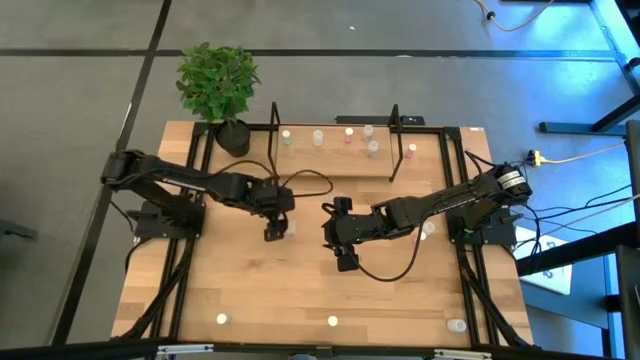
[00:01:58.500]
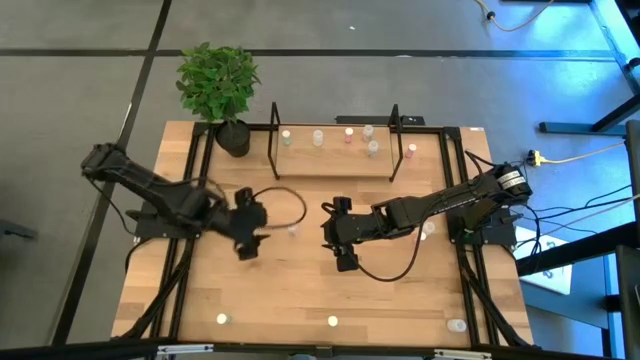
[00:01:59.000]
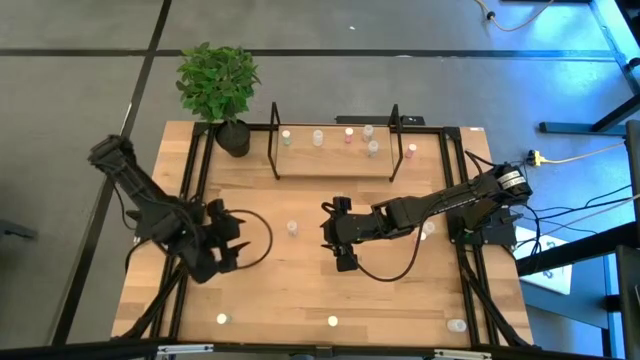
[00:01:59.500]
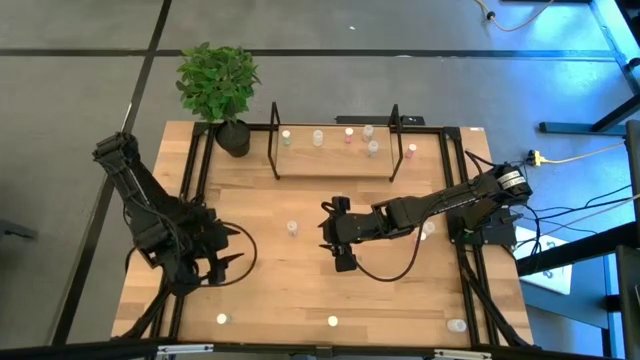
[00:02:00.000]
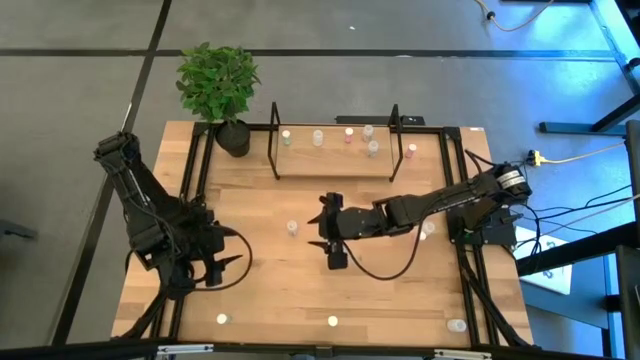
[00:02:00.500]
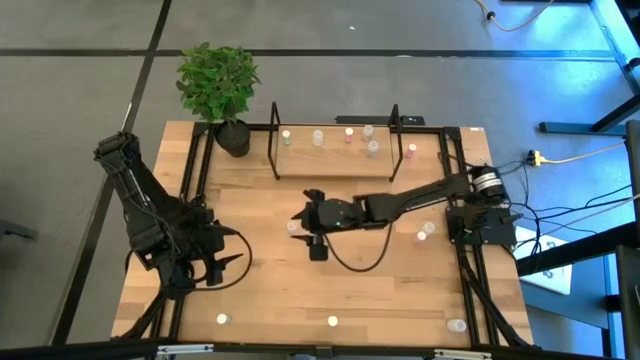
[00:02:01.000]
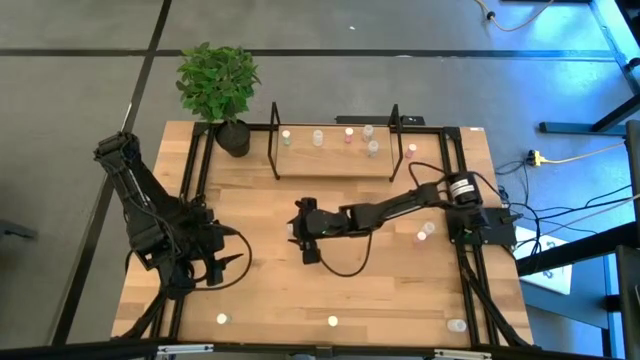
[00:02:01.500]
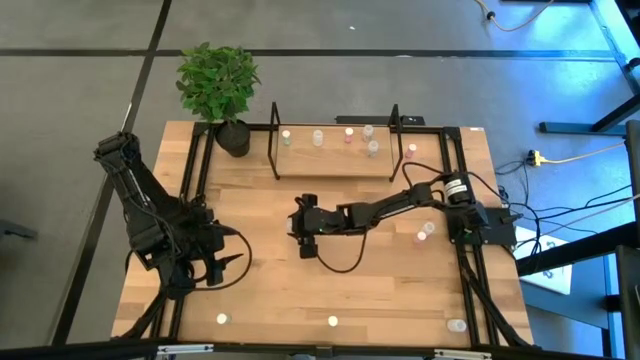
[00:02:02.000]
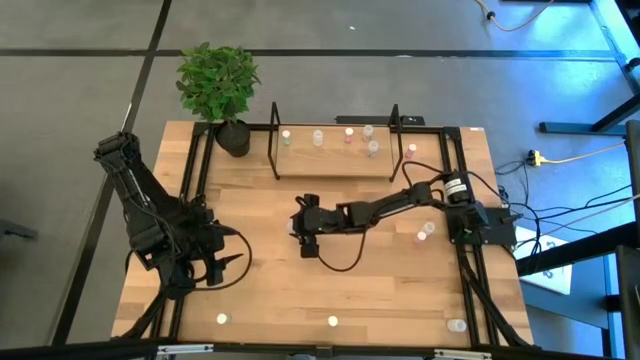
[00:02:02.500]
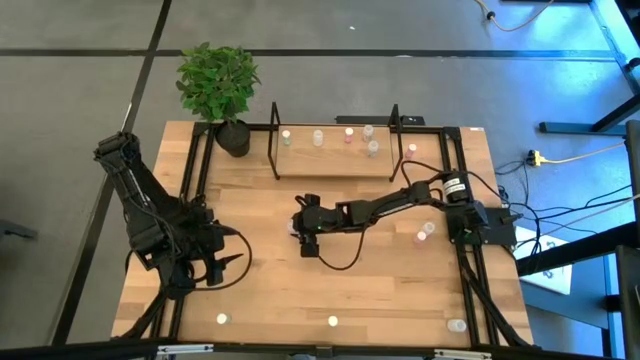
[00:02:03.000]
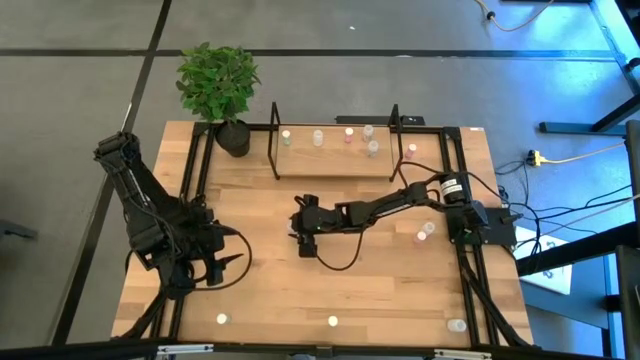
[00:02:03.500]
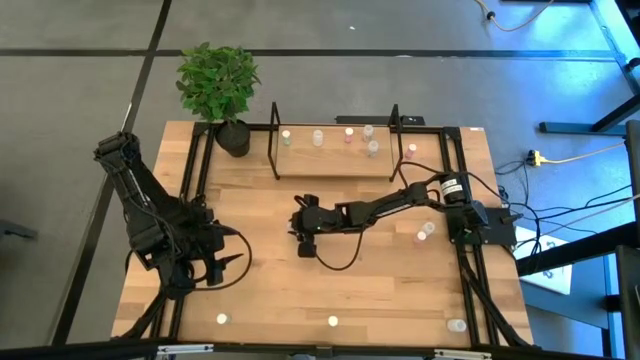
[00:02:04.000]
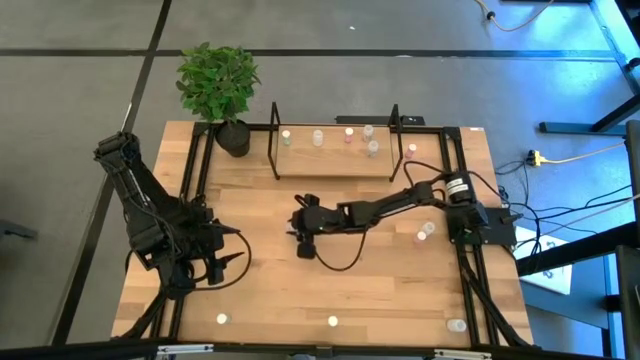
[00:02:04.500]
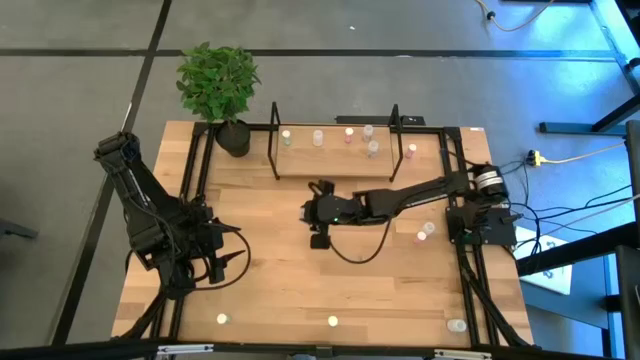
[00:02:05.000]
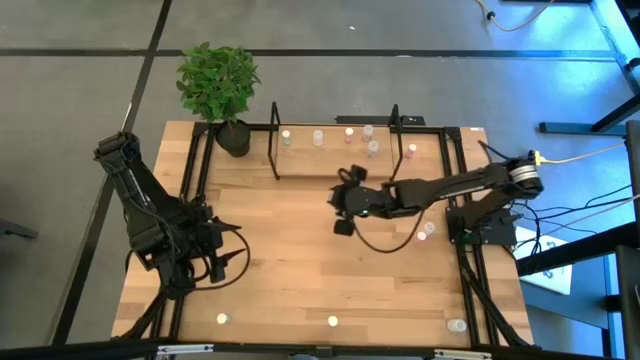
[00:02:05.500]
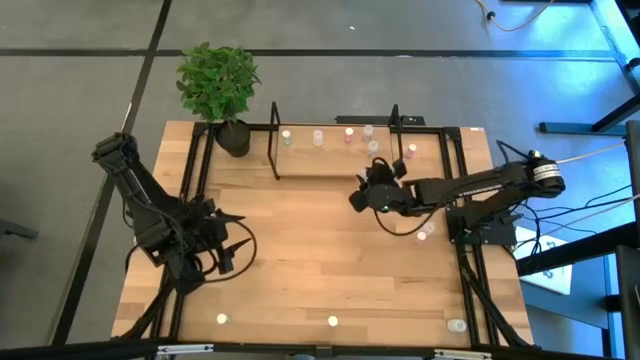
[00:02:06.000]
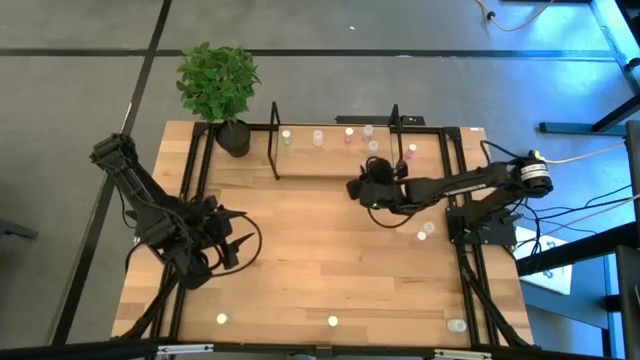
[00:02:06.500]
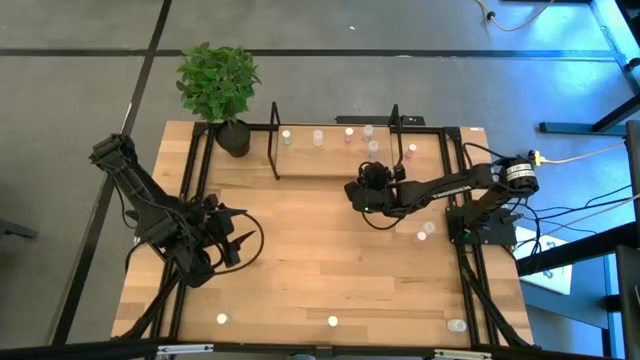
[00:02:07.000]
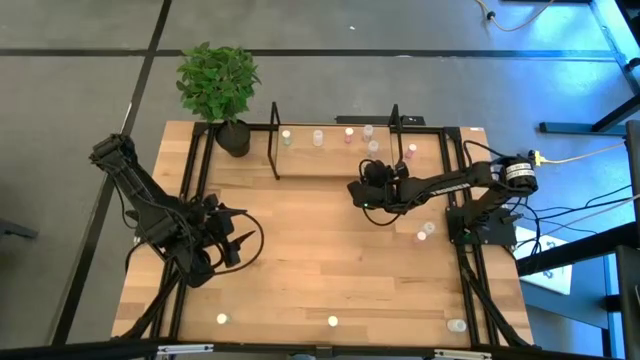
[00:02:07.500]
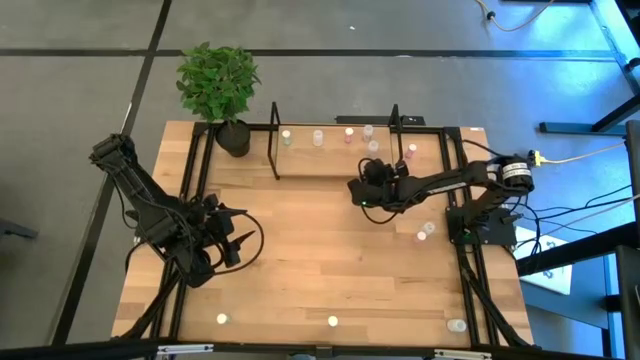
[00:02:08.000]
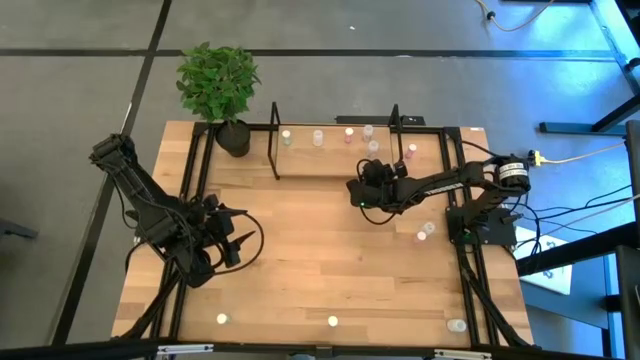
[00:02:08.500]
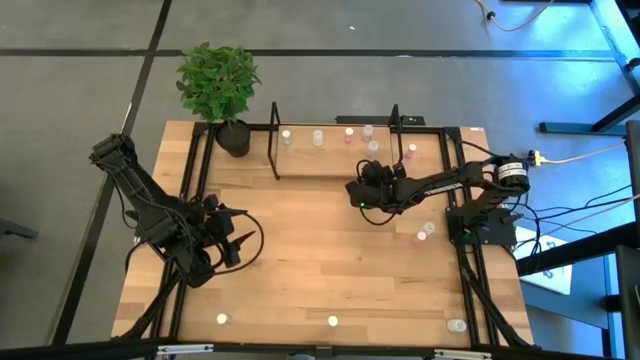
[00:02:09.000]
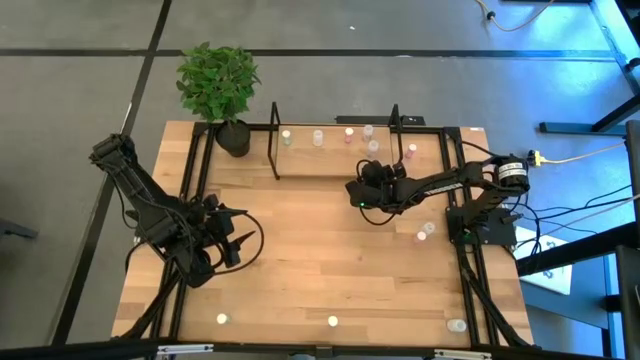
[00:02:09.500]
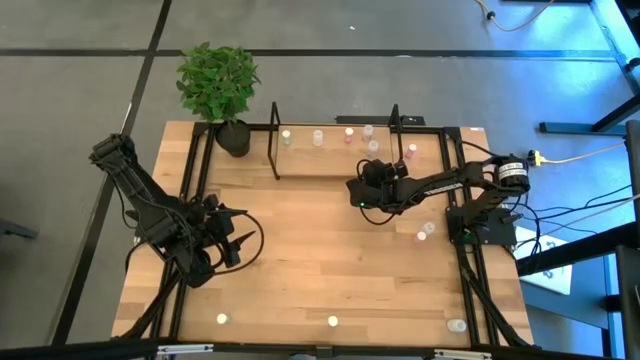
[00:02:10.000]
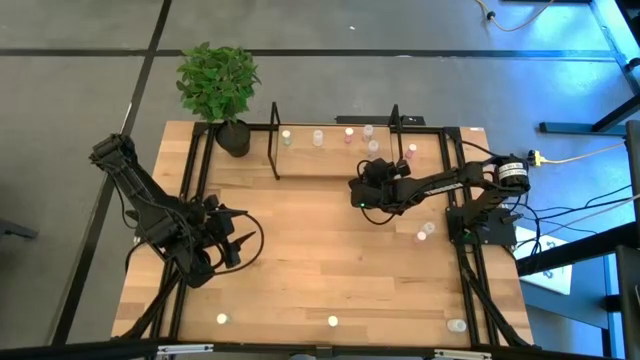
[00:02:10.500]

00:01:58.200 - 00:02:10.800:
Task: Pick and place medicine bottles onto shelf by color
Put the transparent medicine bottle on the shelf aligned with the other transparent medicine bottle

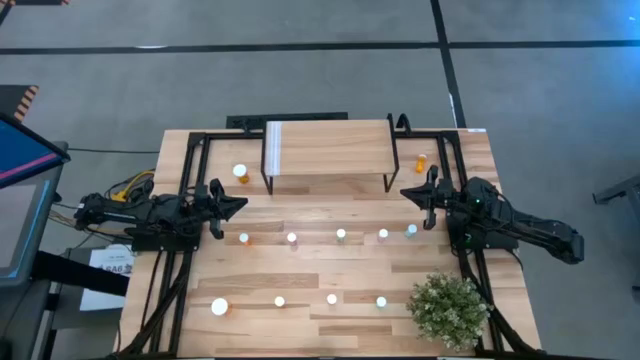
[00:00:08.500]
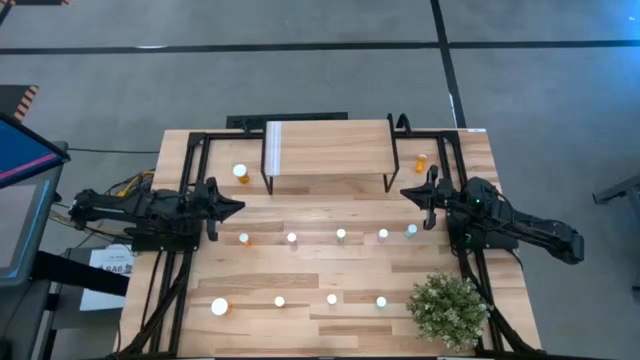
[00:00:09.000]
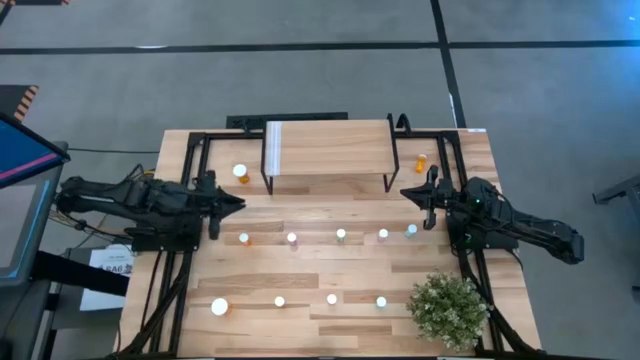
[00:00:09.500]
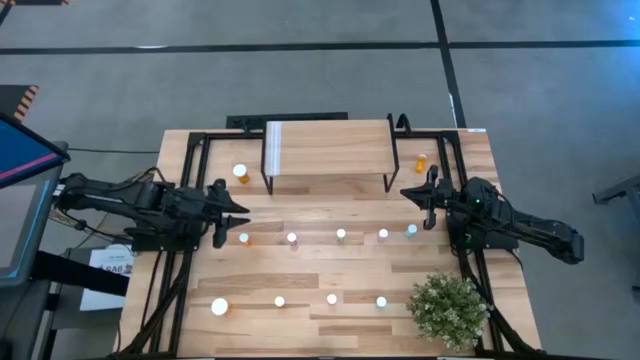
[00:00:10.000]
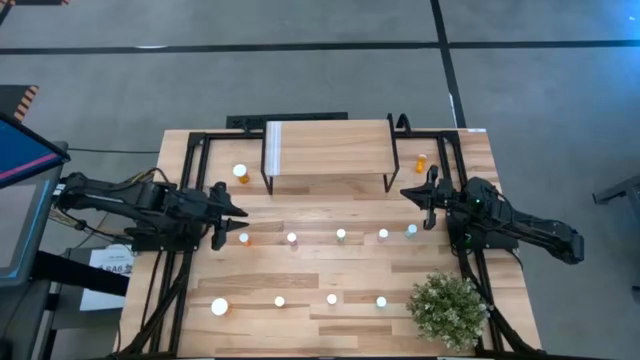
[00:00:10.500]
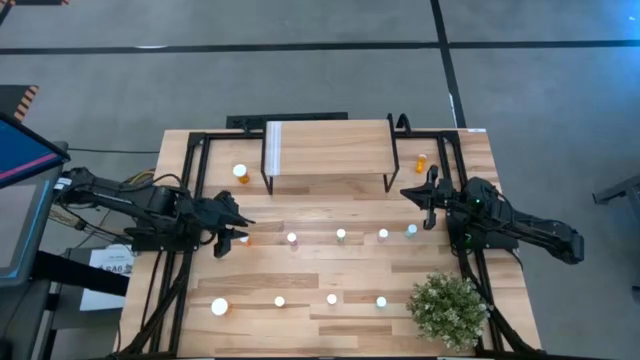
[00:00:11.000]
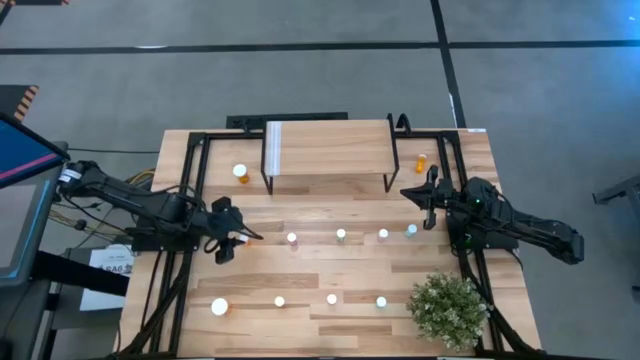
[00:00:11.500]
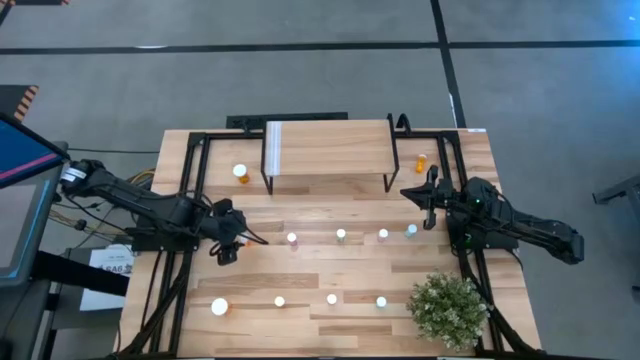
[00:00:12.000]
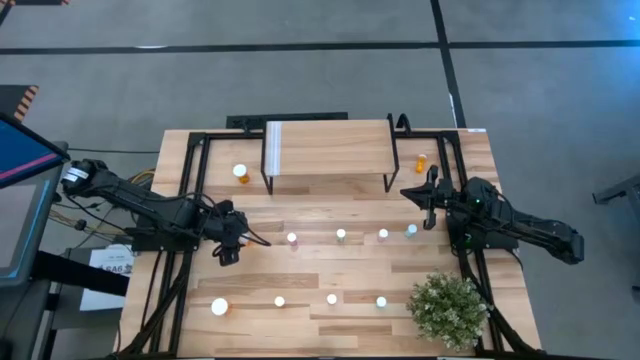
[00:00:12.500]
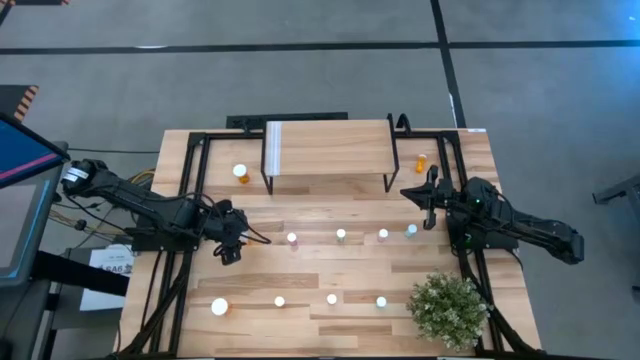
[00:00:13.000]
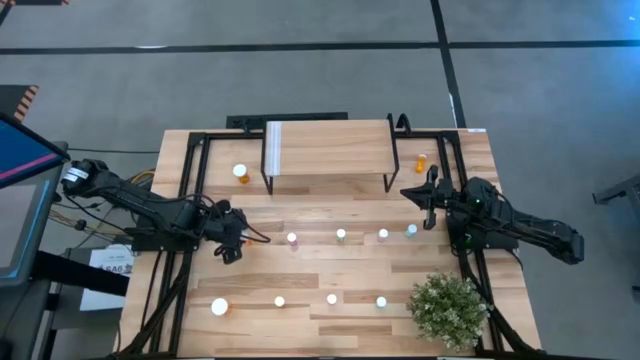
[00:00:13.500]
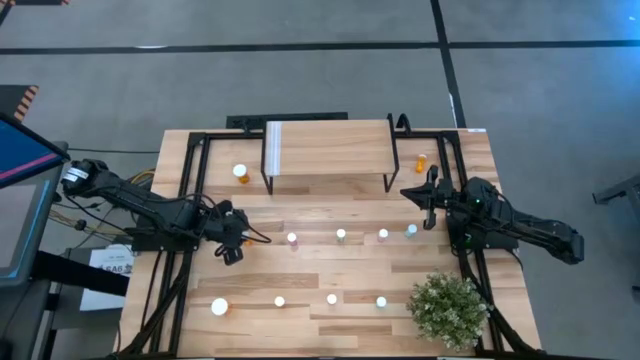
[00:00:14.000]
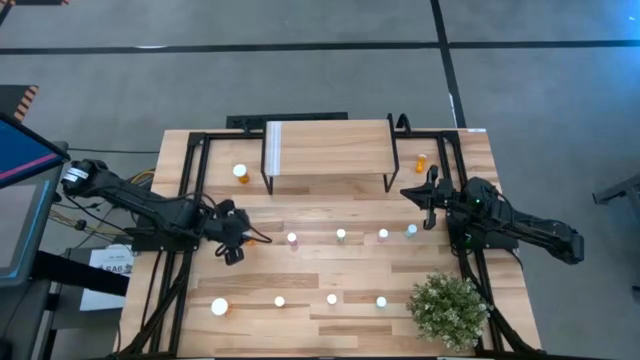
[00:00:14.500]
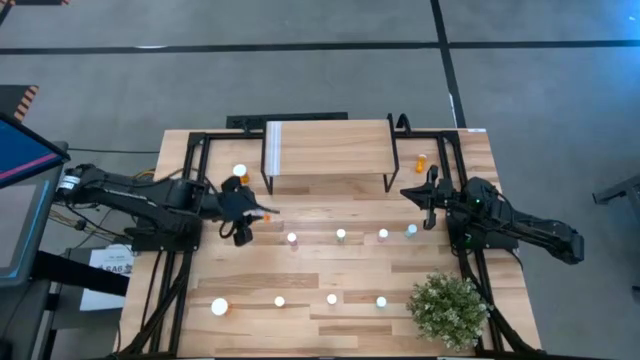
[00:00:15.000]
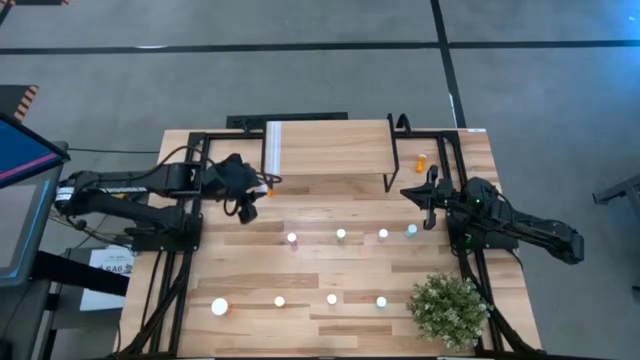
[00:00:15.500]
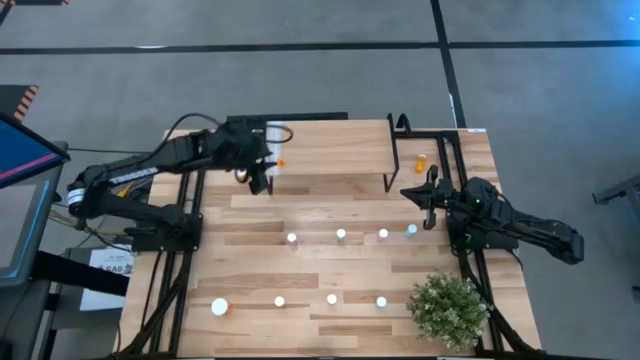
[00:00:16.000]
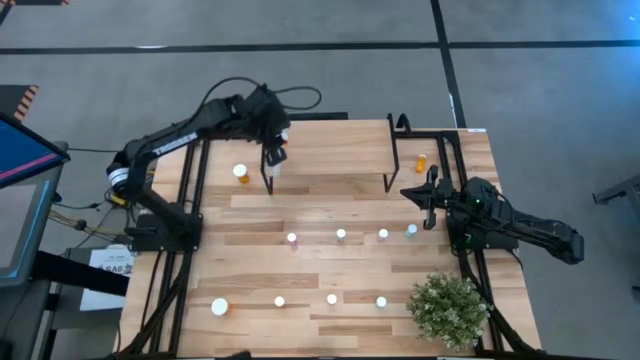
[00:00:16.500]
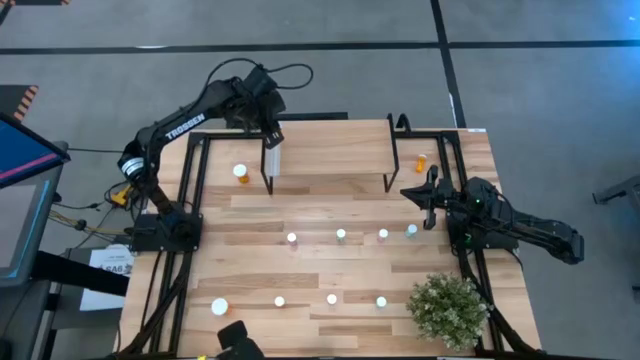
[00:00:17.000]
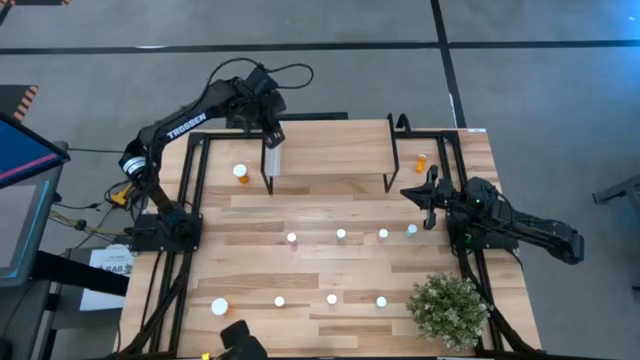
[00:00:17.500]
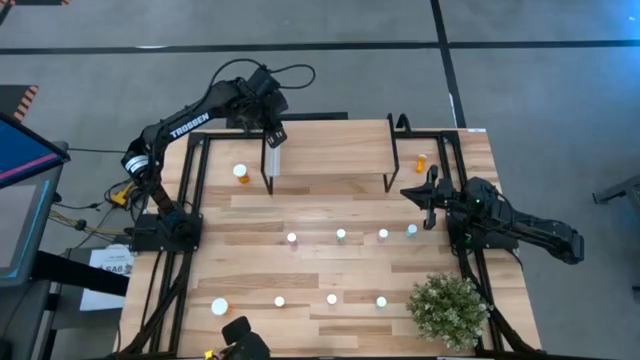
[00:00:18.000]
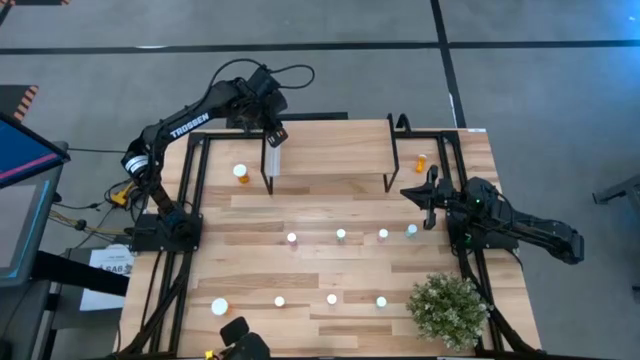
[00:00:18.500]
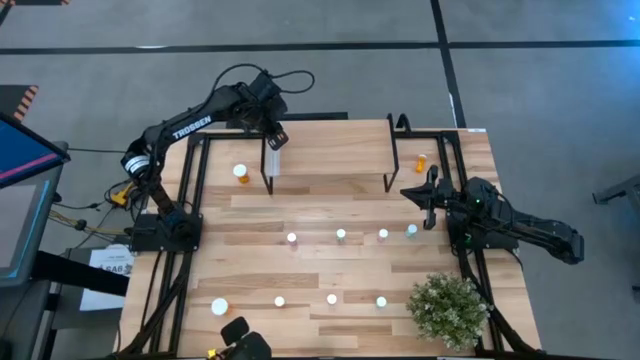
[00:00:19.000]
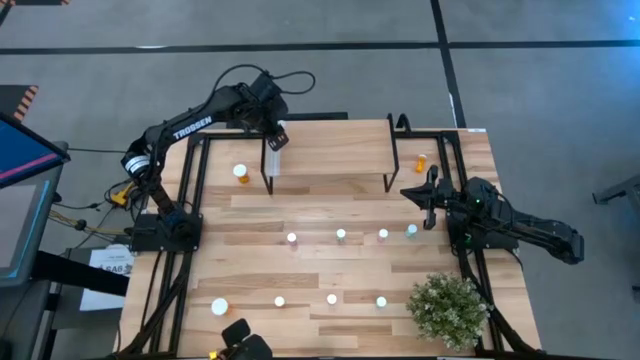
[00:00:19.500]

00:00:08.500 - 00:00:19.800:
Task: Pick and place medicine bottles onto shelf by color
Put the middle left small orange pill bottle on the shelf
